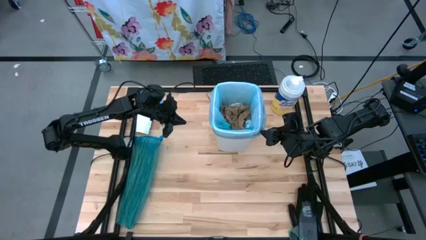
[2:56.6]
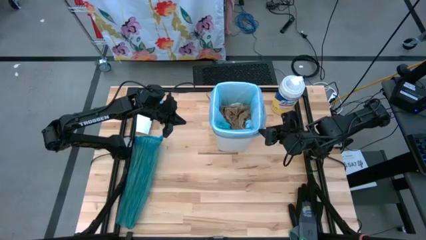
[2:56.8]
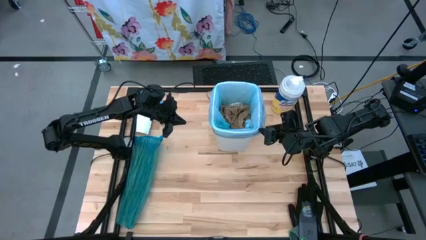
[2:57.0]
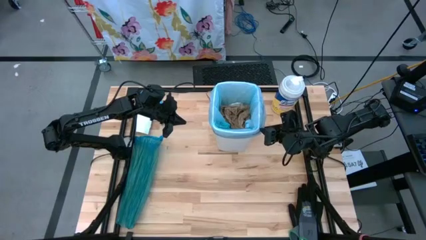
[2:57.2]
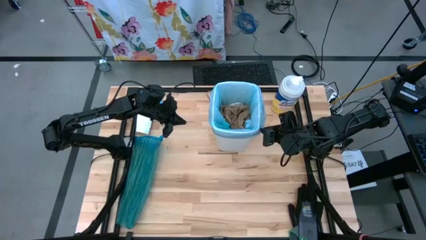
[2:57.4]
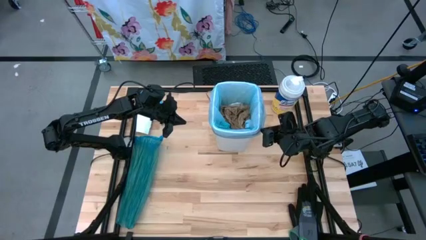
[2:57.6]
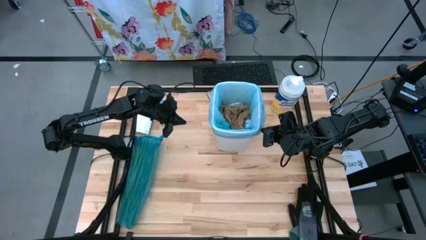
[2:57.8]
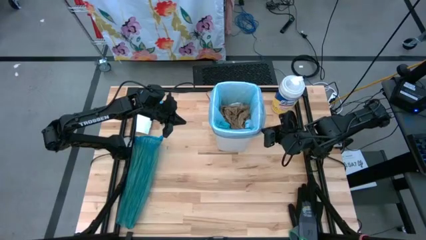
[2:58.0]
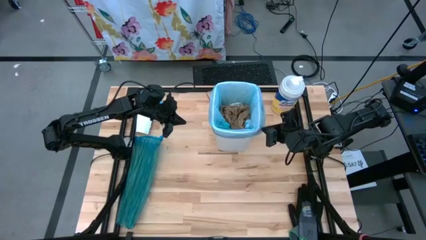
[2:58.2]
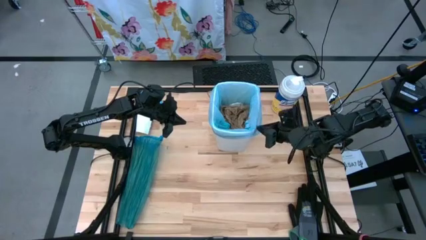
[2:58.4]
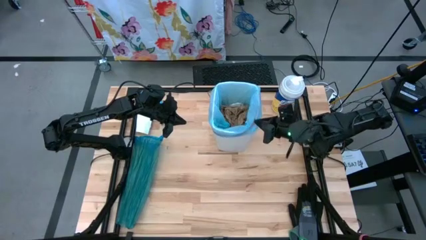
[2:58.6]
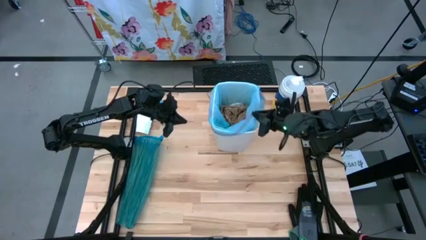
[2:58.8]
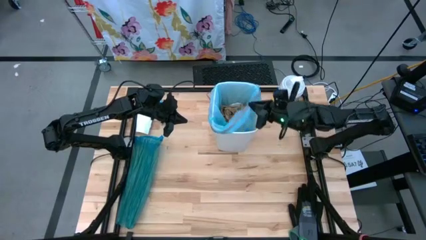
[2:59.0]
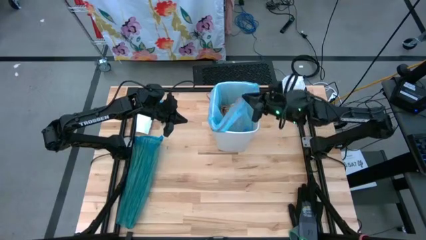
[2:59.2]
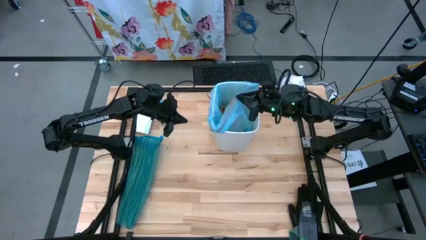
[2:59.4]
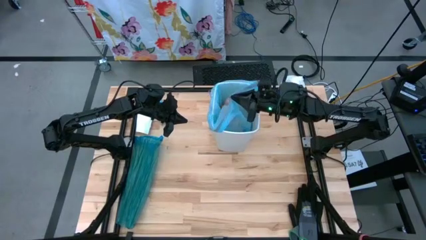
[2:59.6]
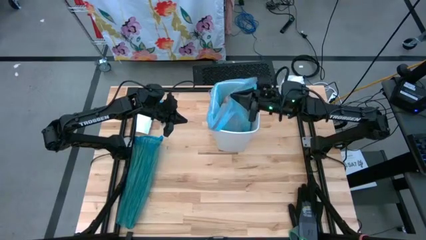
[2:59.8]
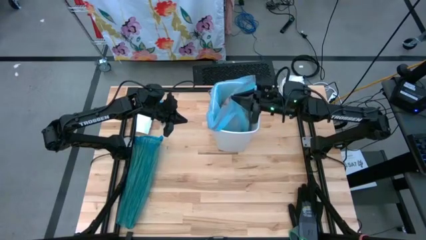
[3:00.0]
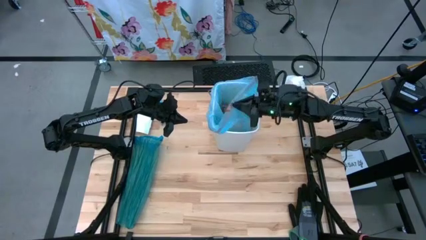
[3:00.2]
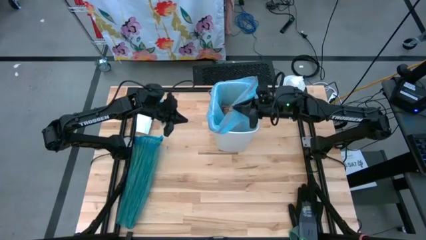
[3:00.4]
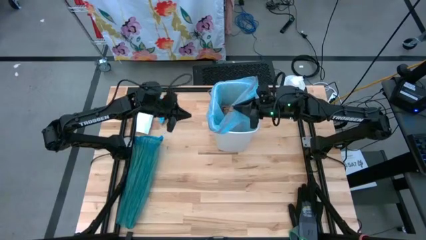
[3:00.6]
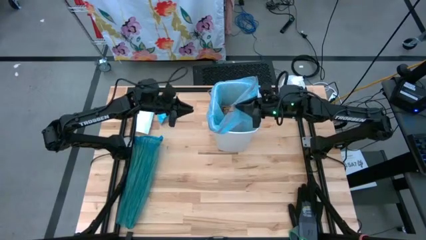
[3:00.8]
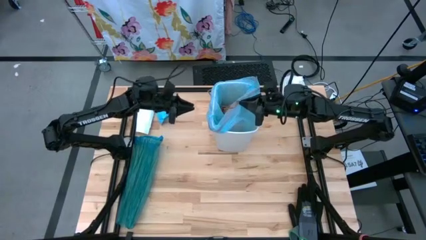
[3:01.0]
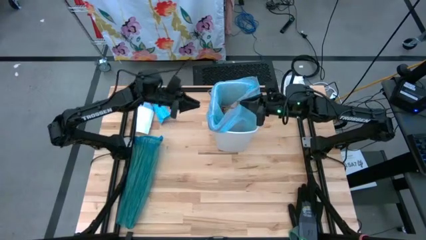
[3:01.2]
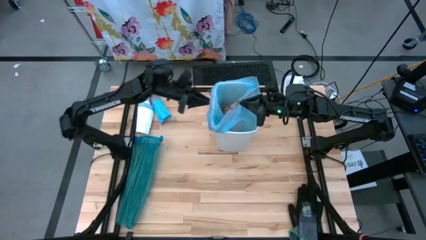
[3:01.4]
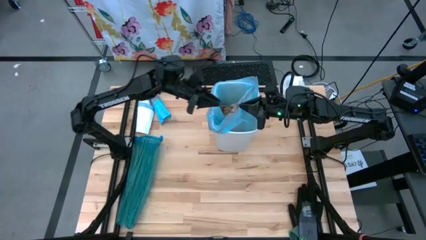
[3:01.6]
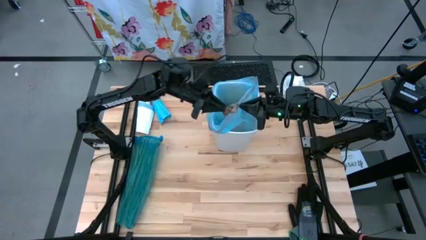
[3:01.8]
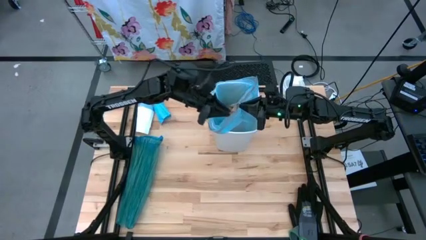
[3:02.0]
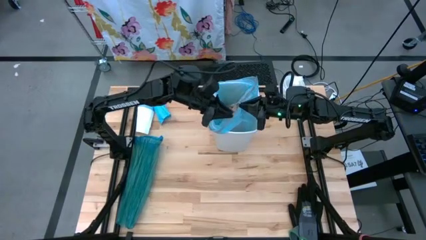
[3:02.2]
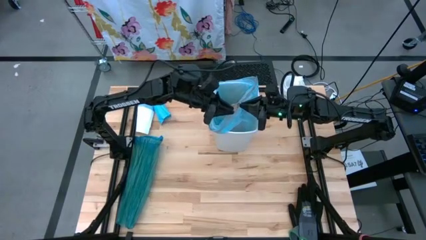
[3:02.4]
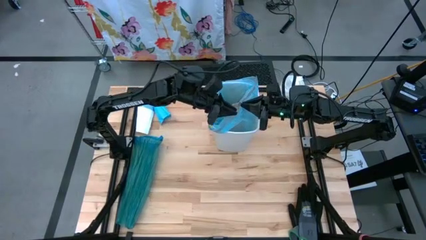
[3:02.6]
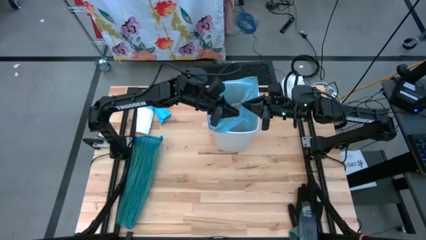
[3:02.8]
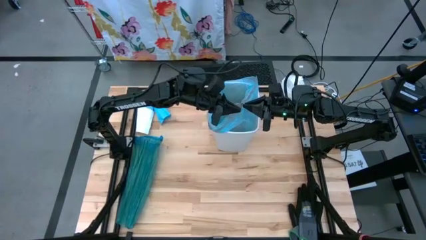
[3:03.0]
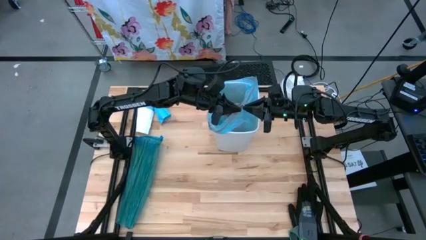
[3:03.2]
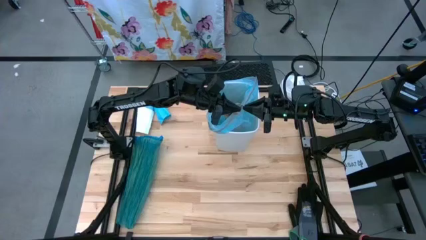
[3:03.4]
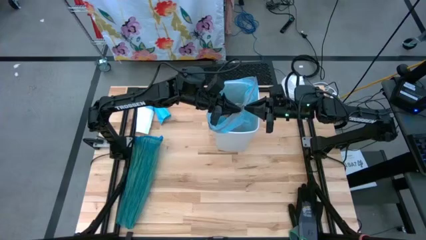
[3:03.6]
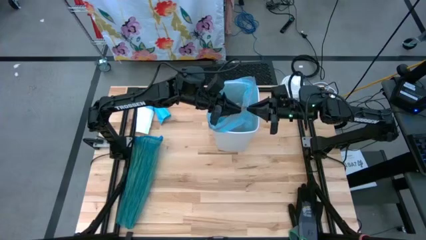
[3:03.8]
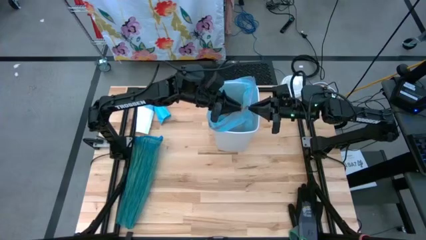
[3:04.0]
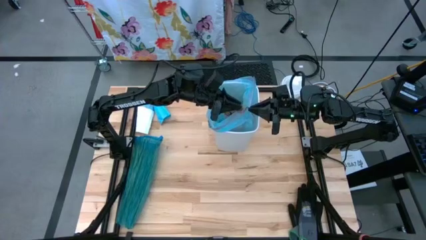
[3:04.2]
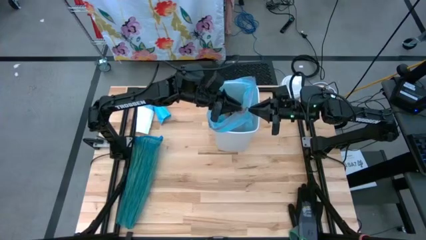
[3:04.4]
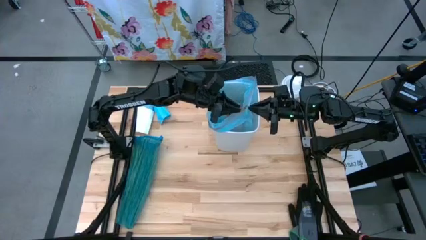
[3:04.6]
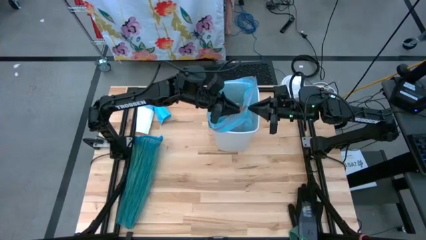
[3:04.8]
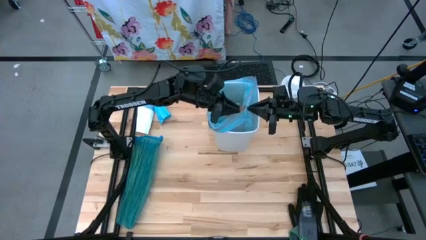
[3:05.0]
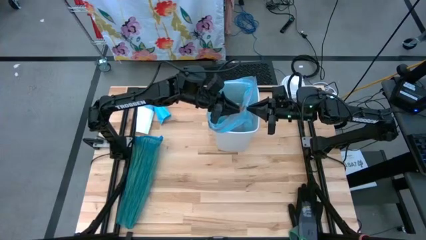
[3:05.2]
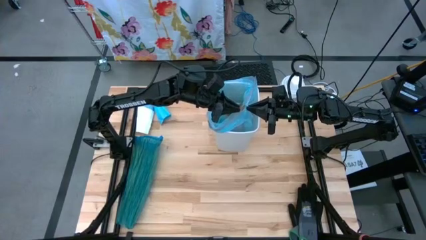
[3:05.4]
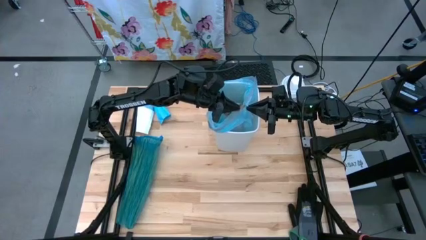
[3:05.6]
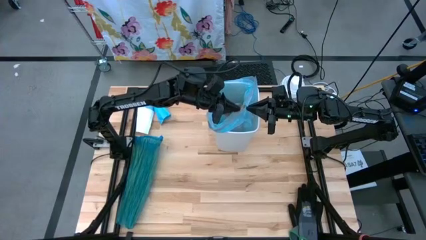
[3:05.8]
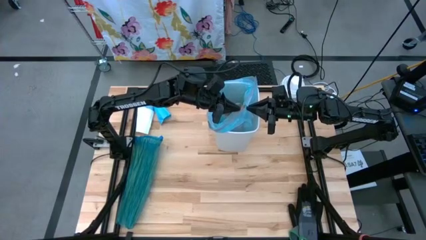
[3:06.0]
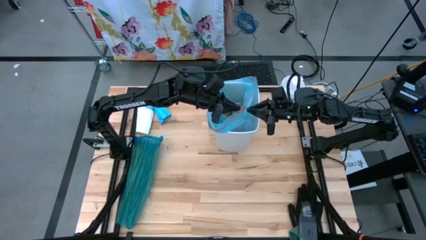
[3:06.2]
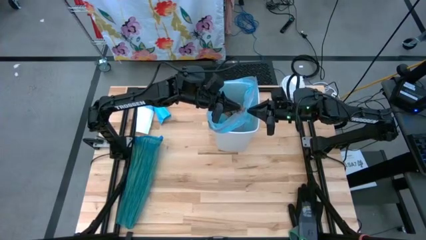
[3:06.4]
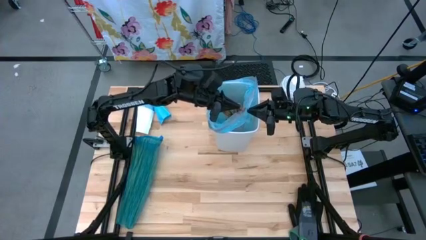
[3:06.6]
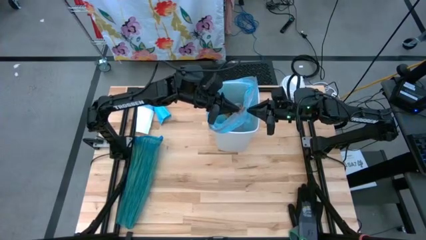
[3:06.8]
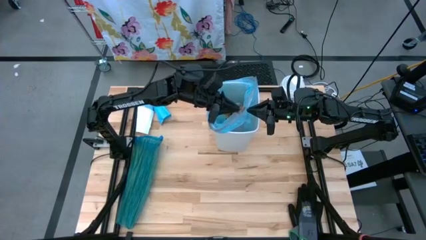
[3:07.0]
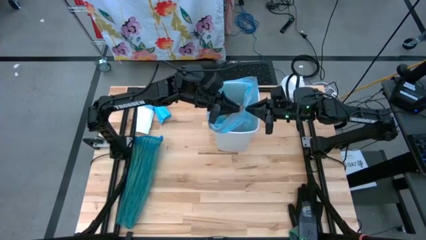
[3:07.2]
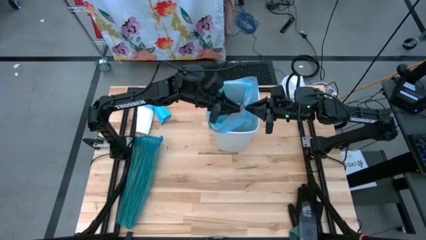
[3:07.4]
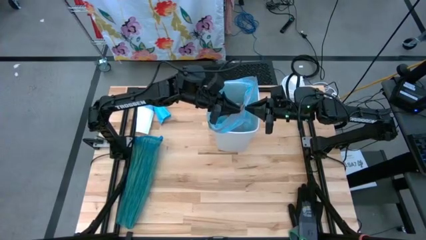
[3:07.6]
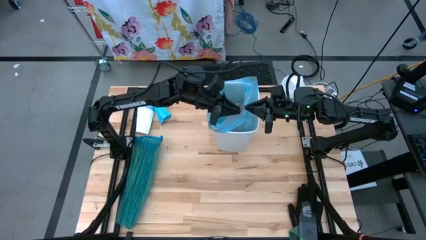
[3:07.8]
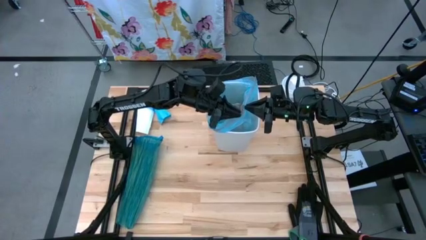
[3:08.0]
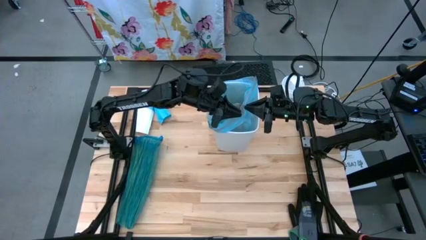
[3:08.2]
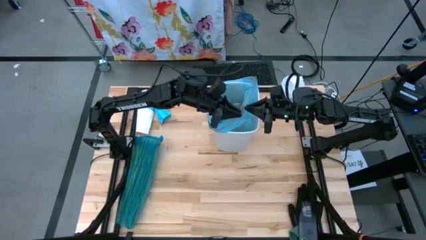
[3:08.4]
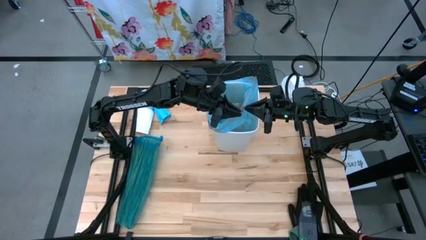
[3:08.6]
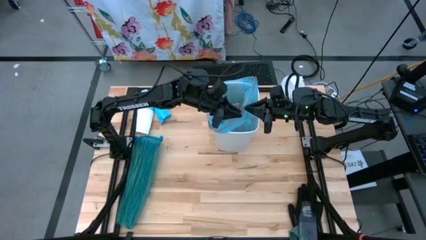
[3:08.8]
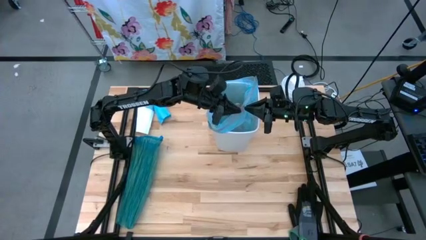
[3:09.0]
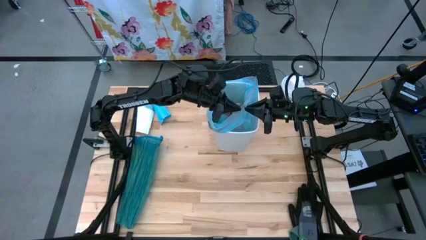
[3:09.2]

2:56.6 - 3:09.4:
Task: place trash/remove bag and relplace
Remove the light blue trash bag from the white trash bin

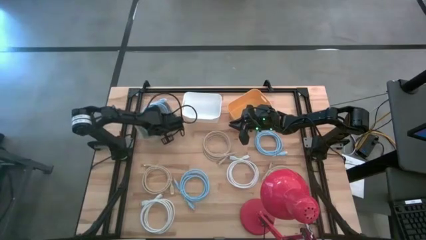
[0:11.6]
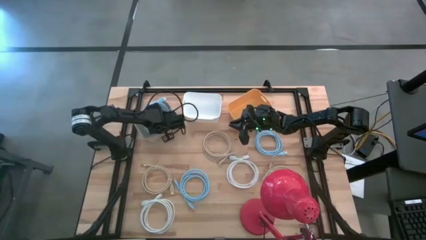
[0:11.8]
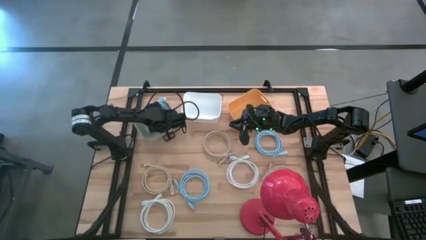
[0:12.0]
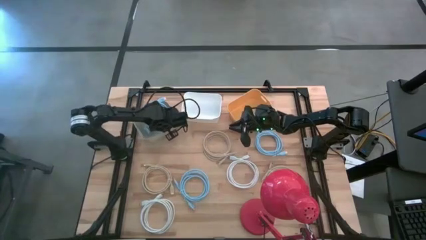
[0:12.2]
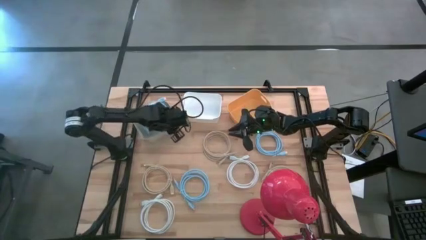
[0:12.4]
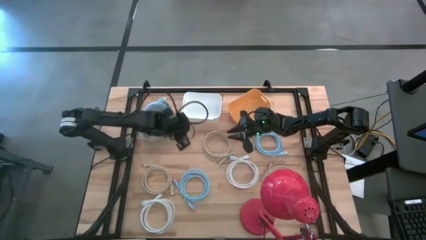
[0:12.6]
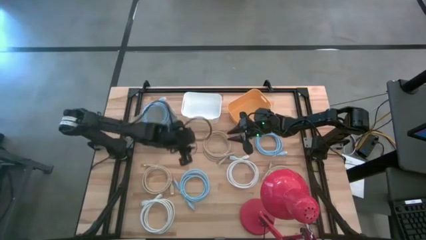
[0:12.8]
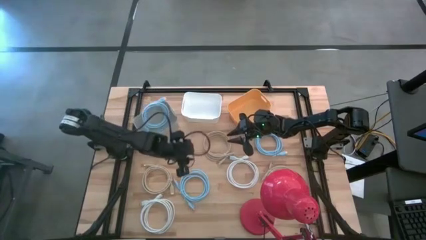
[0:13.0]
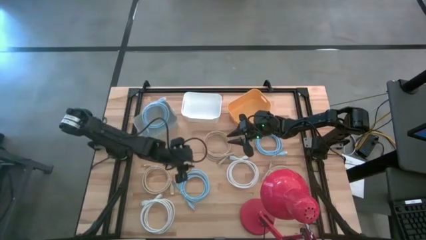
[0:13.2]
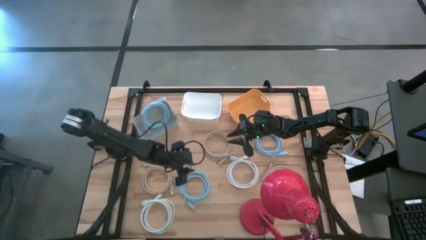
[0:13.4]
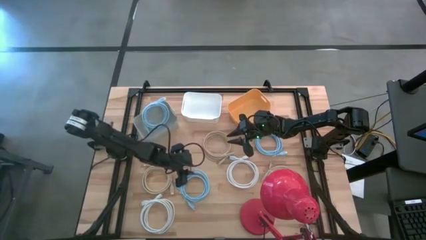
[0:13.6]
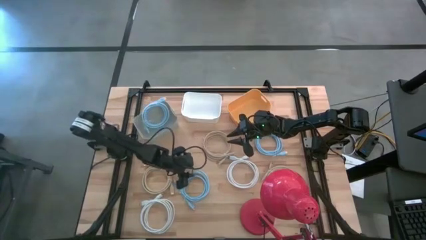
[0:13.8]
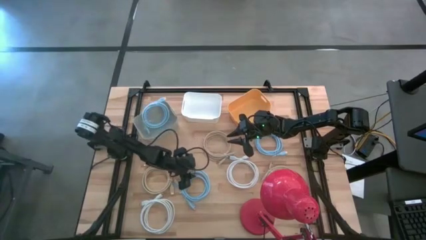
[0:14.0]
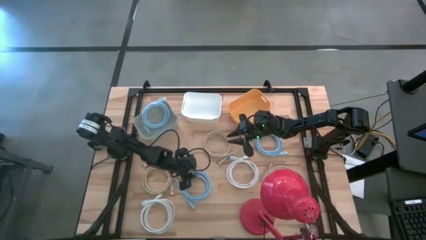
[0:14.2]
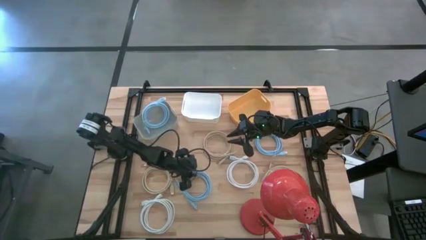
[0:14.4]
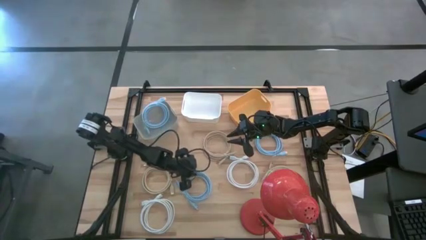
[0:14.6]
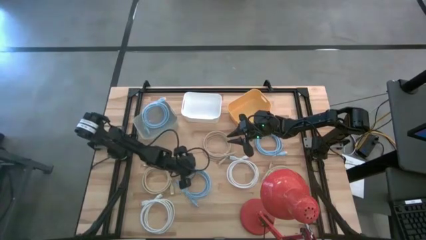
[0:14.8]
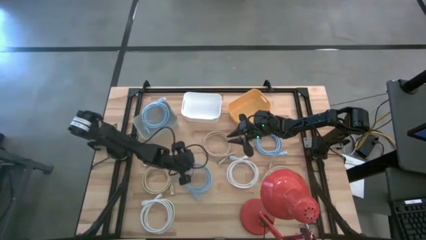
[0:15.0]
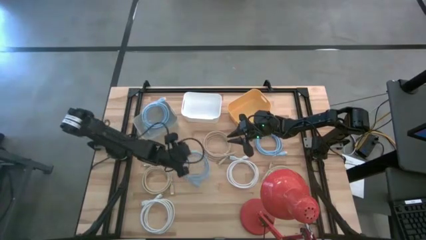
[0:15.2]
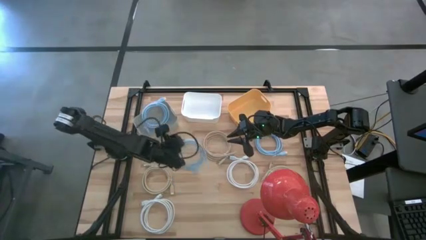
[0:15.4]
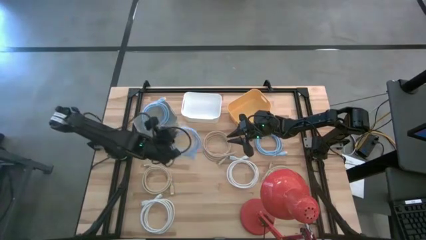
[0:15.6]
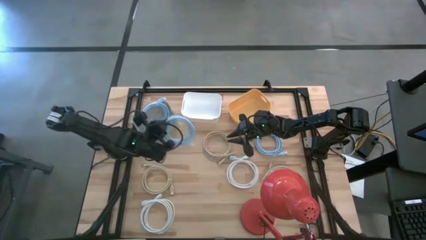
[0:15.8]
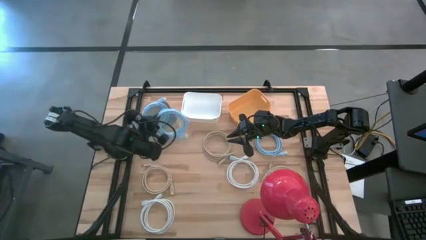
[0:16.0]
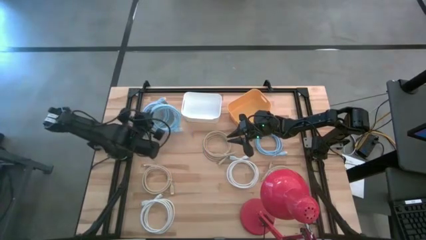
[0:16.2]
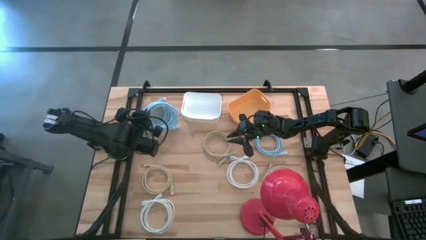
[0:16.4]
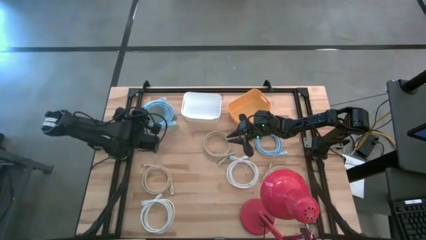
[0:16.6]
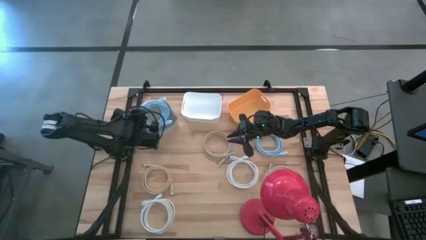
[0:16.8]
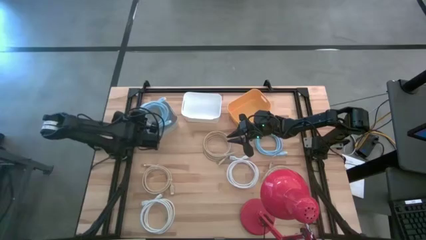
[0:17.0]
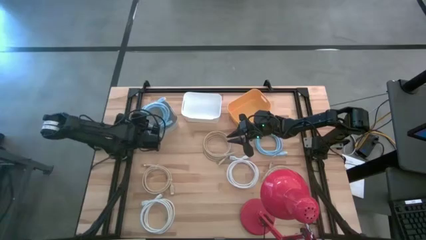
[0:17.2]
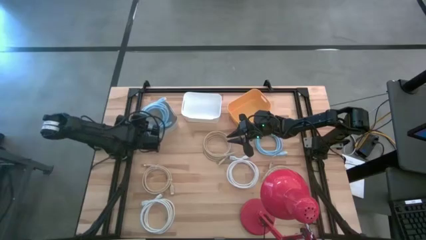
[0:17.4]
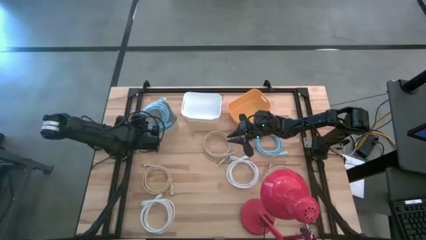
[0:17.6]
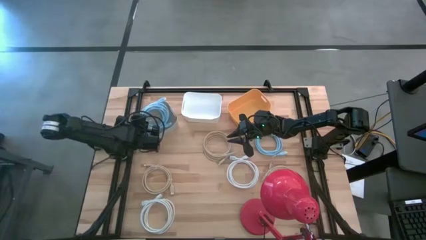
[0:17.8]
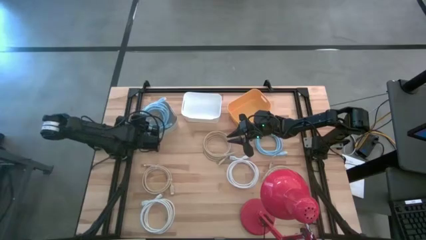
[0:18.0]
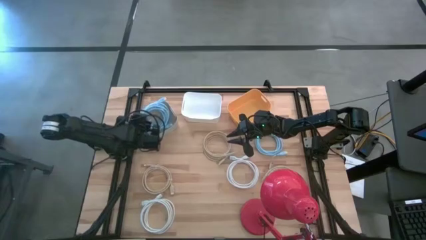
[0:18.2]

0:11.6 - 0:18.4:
Task: Pick & Place USB Port
Put the bottom blue USB cable into the gray bin
